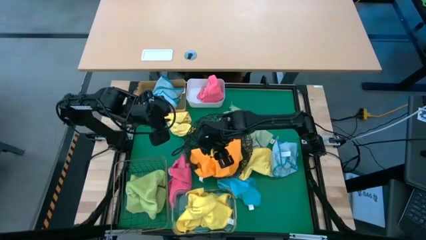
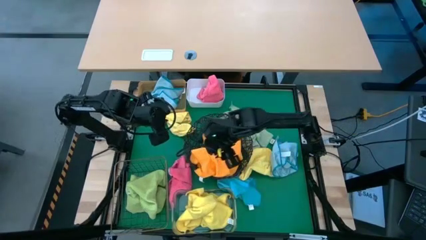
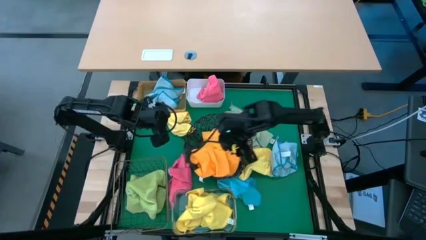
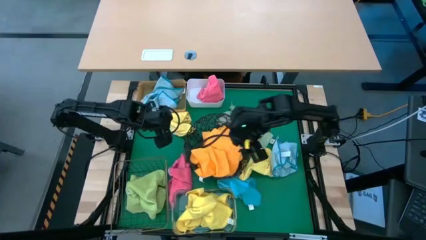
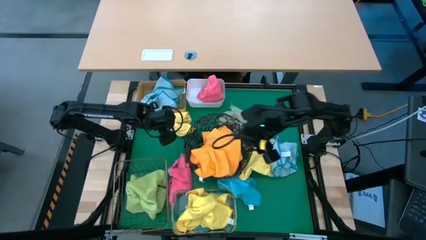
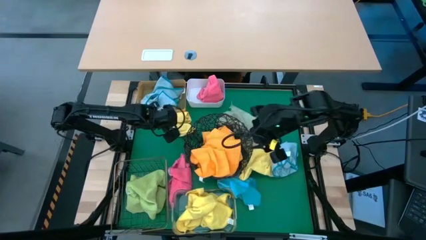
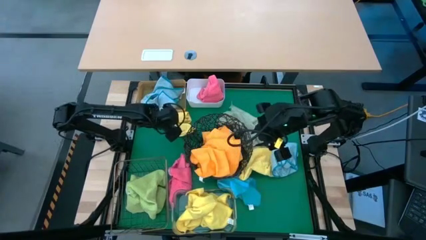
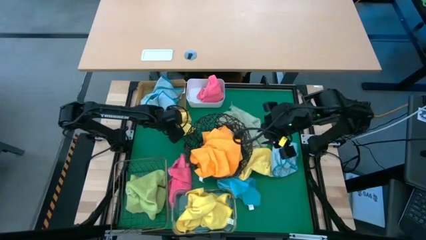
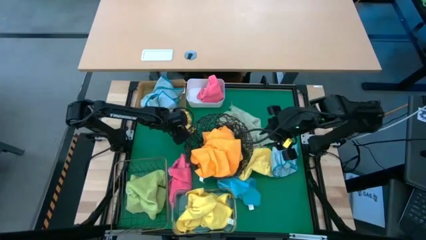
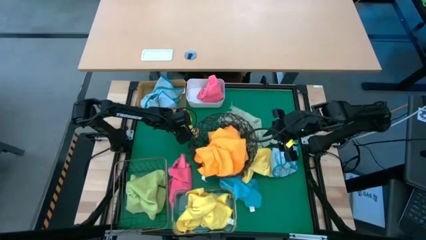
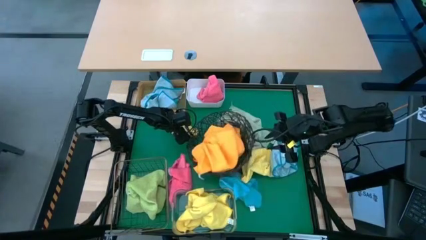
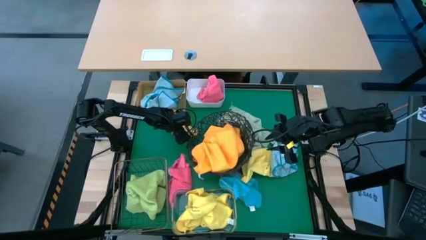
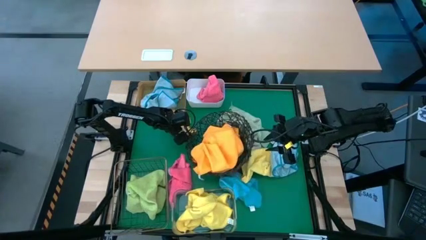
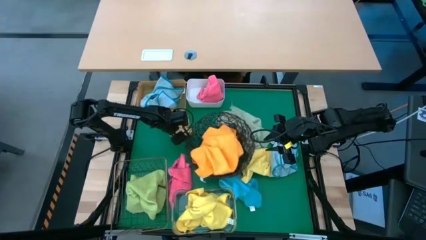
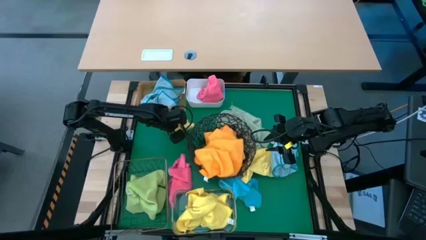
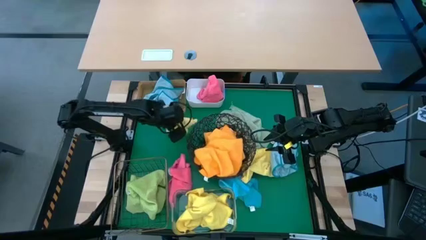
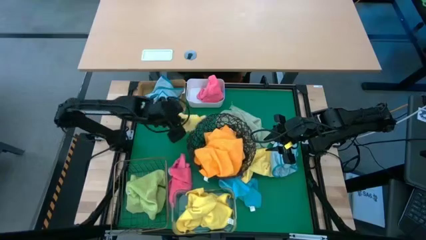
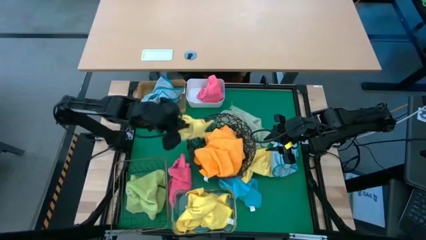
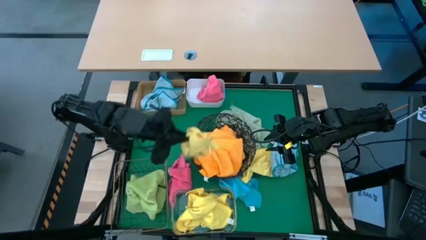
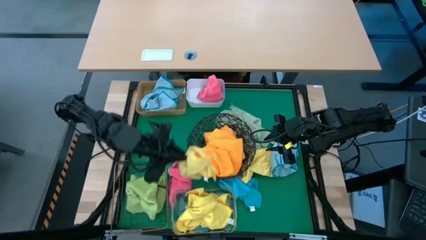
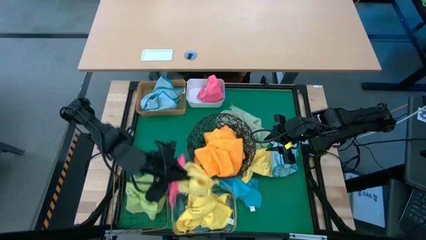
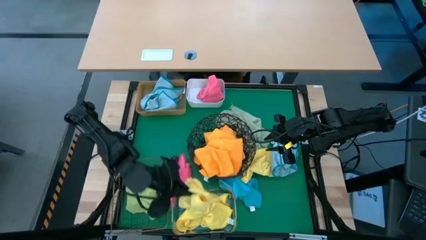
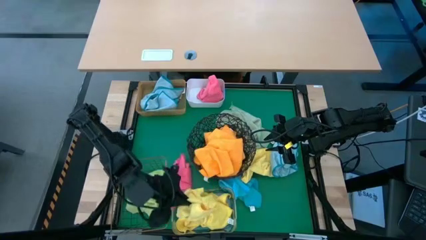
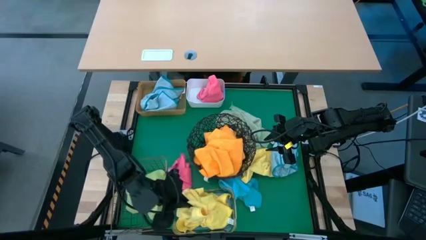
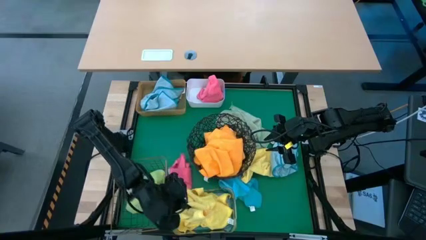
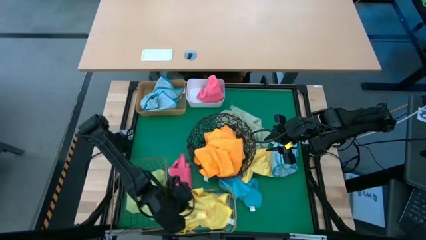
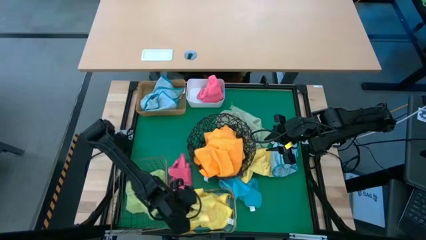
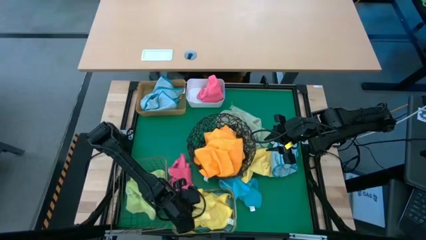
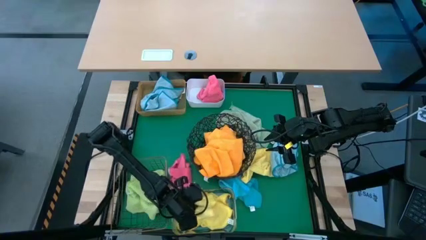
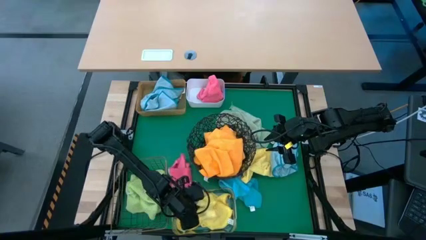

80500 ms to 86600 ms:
Task: Sort microfiber towel by color & place in baskets
Put the yellow towel into the transparent bin

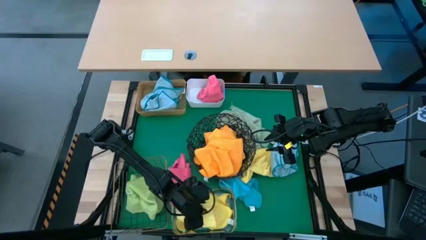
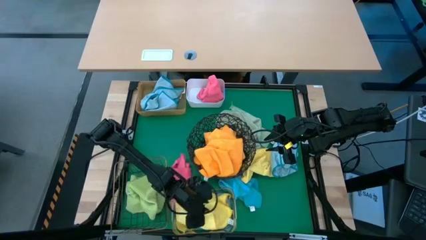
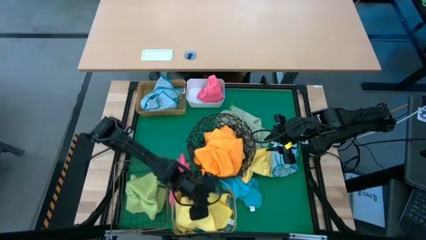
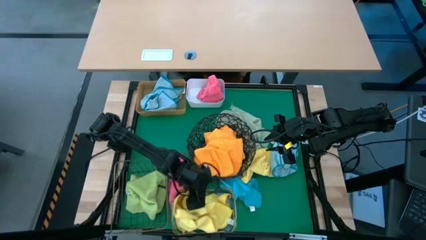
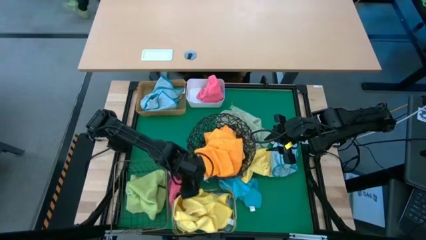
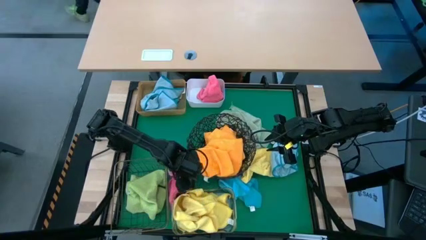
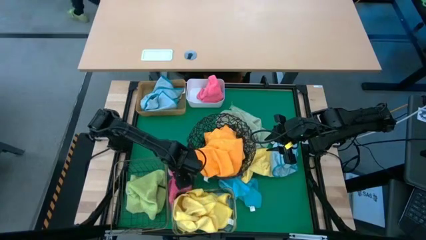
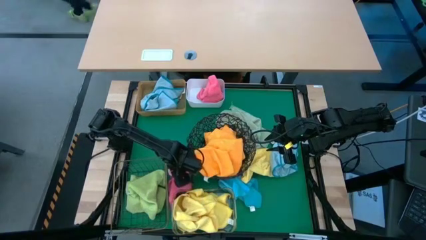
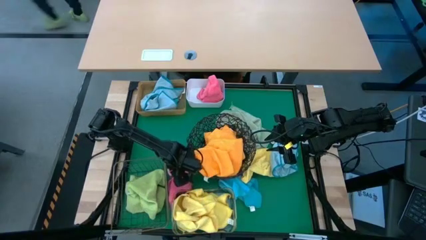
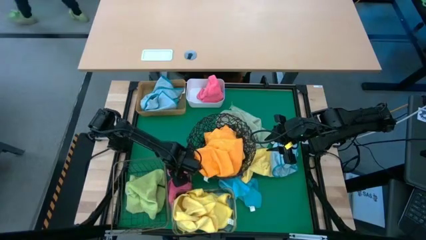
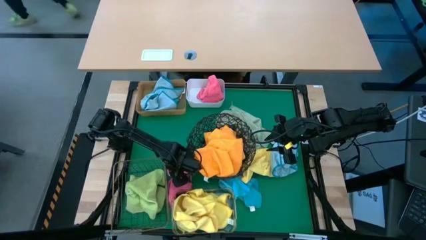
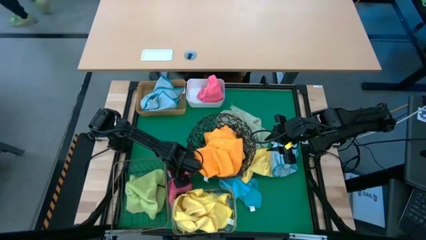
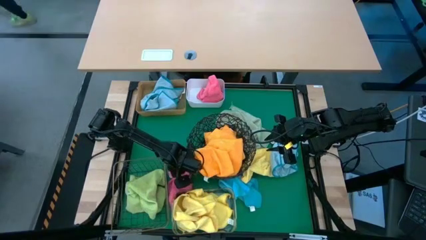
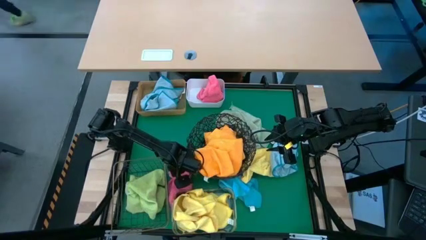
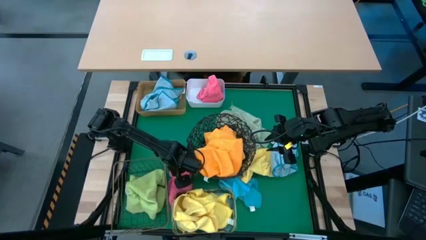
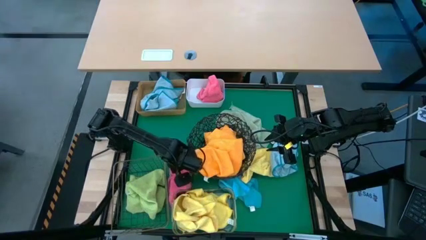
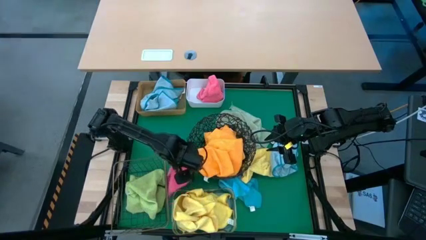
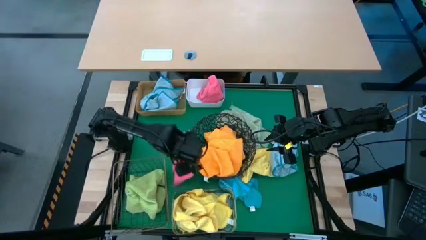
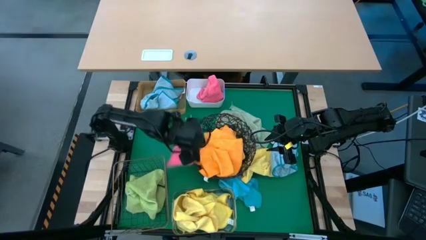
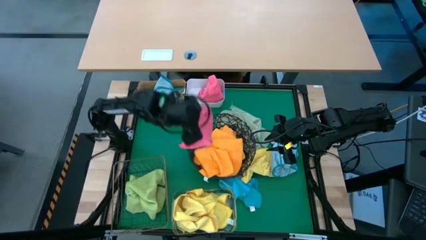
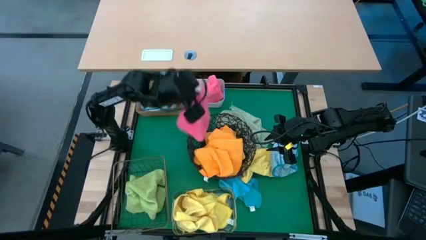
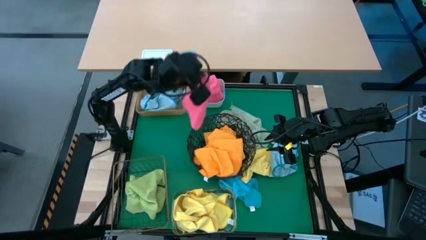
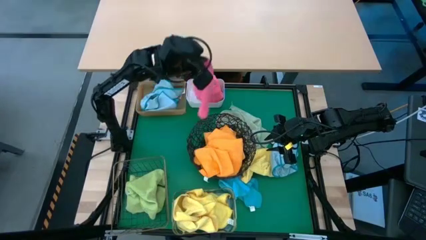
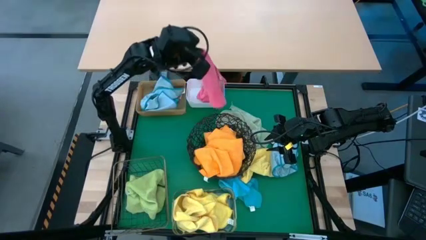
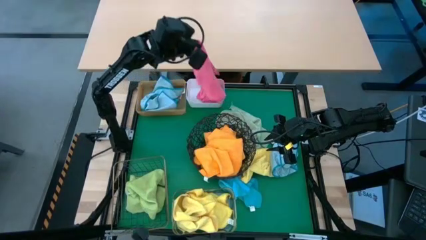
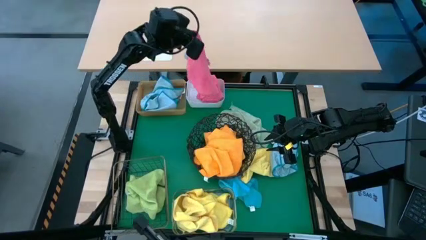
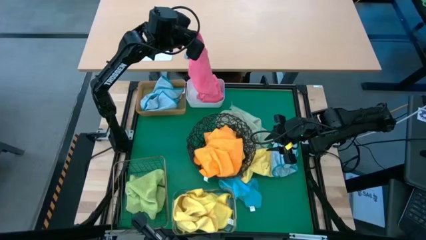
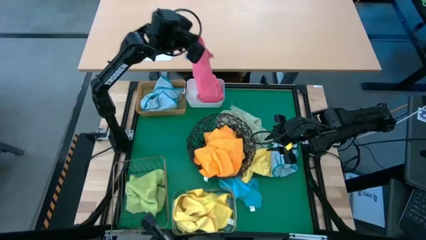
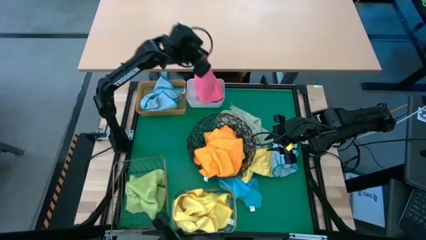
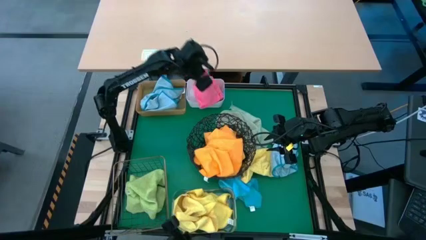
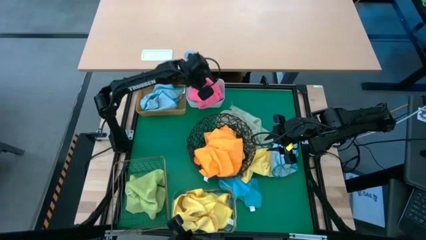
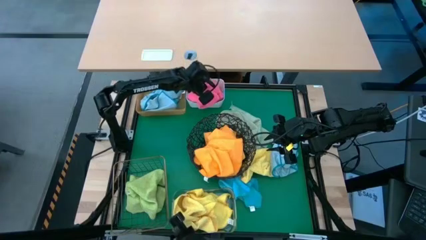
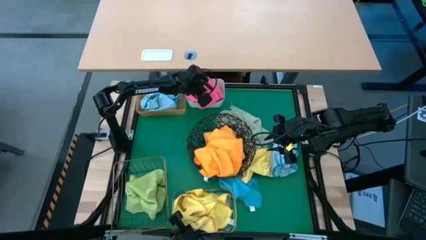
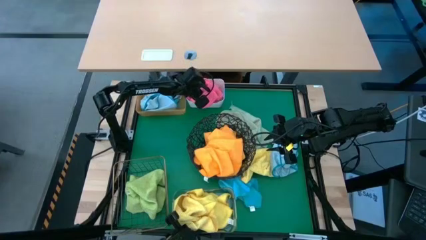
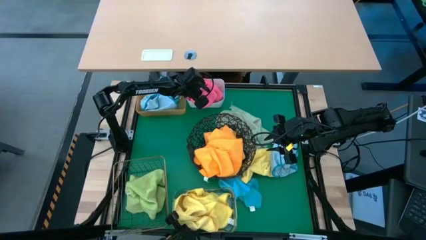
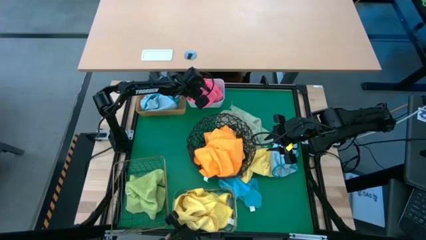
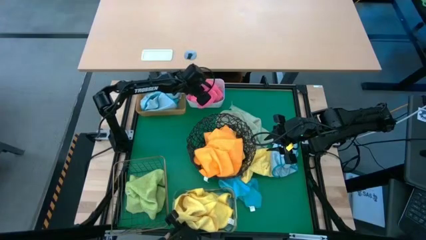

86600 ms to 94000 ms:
Put the pink towel into the white bin

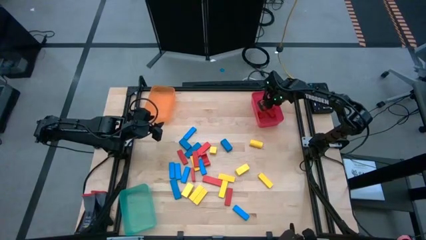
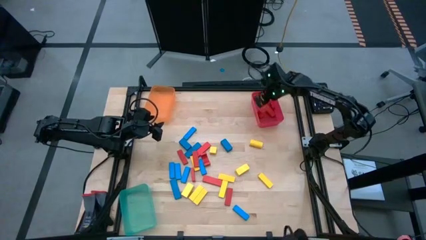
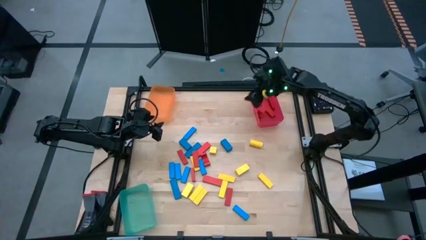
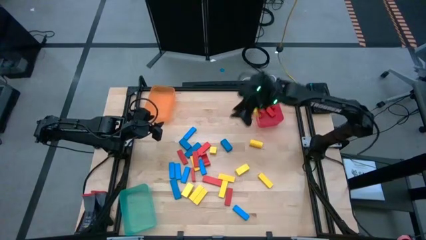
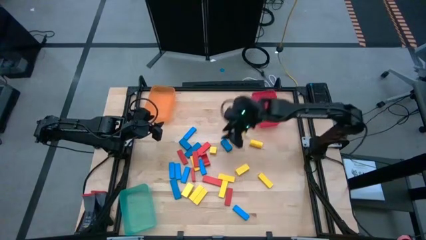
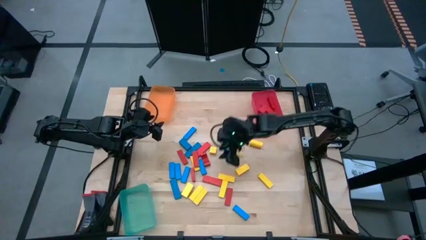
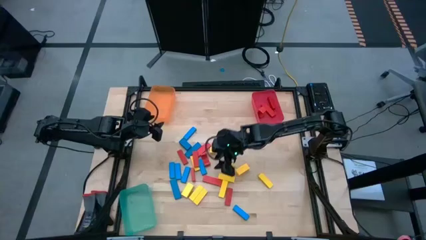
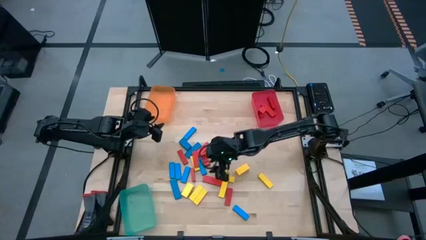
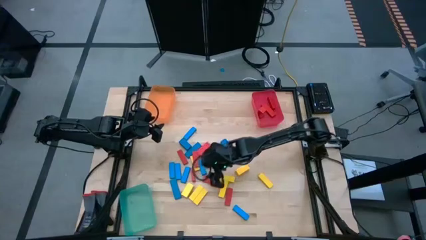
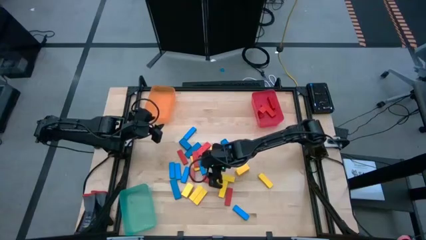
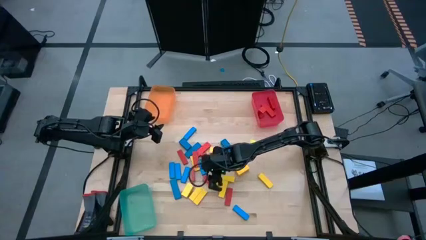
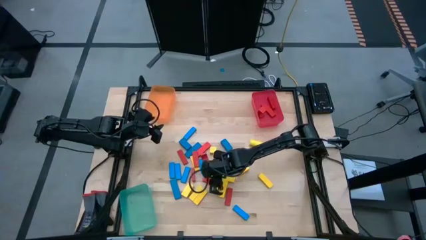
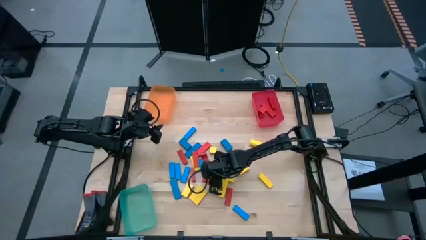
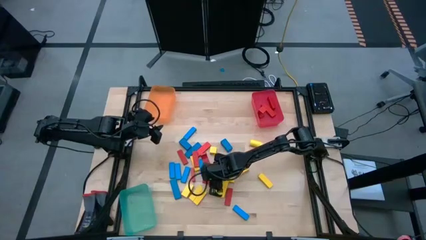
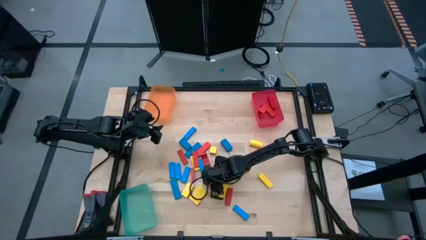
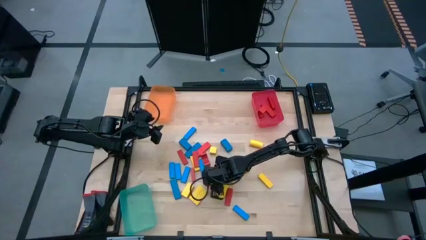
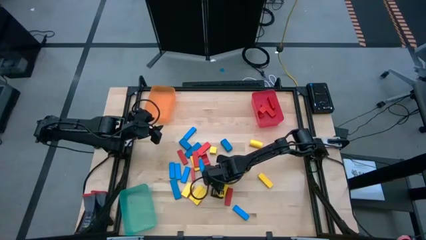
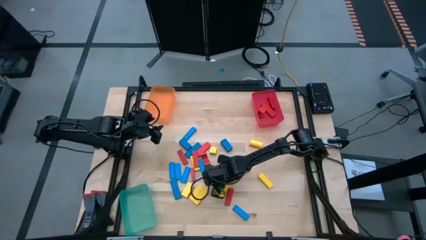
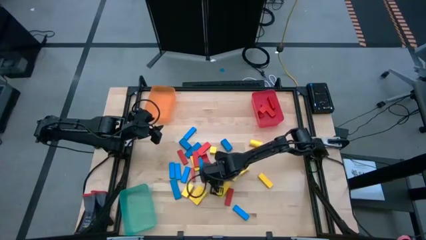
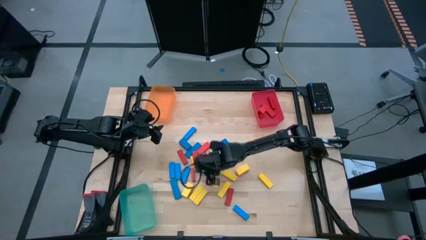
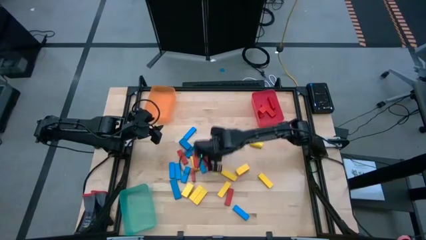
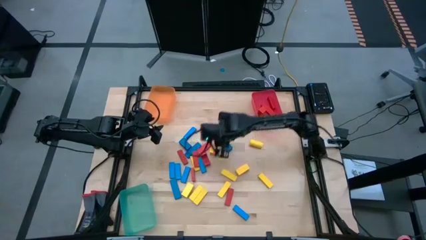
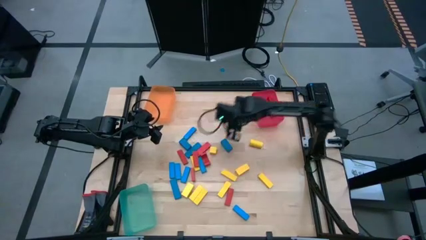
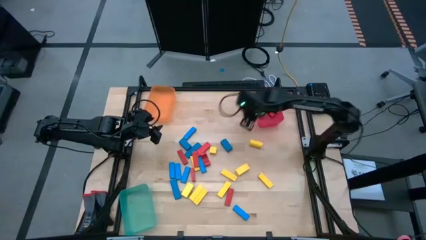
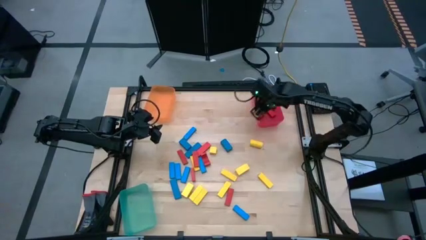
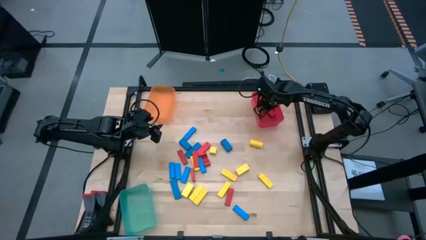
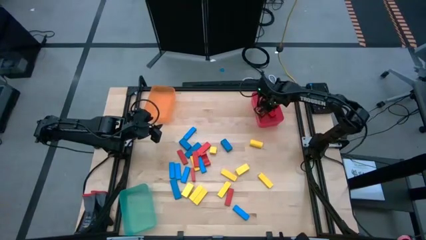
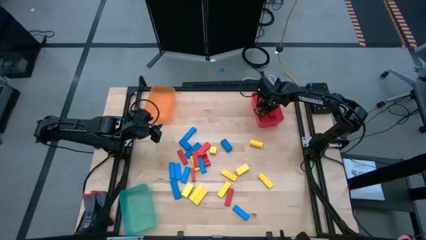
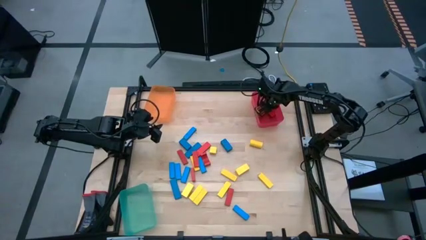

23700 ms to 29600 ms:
Task: Sort blocks
Put the red block into the red transparent bin
